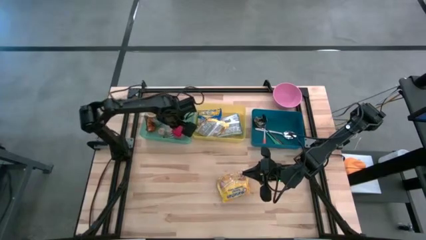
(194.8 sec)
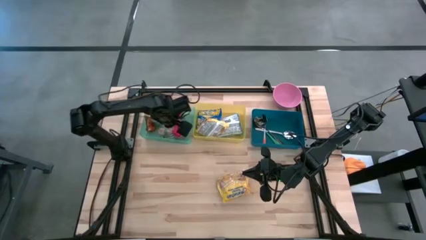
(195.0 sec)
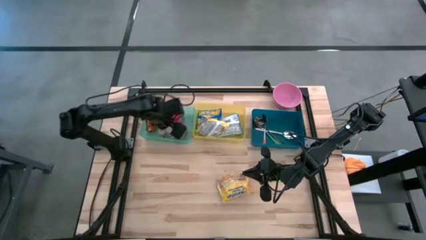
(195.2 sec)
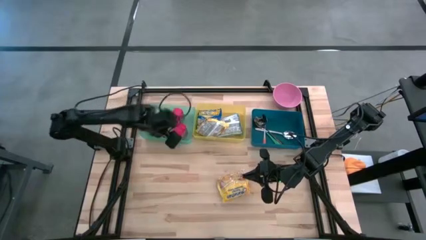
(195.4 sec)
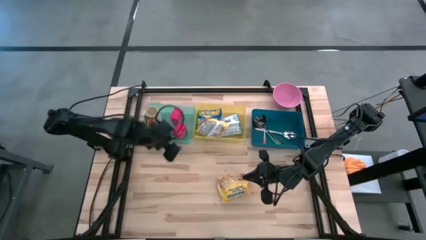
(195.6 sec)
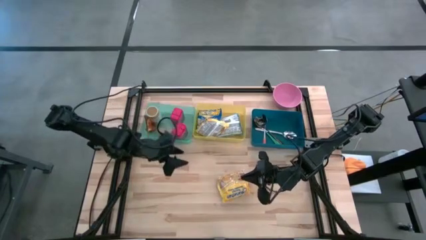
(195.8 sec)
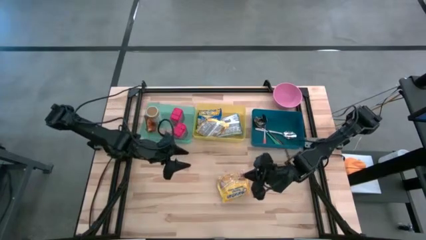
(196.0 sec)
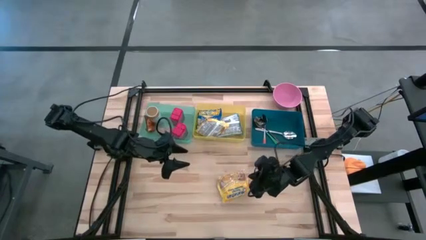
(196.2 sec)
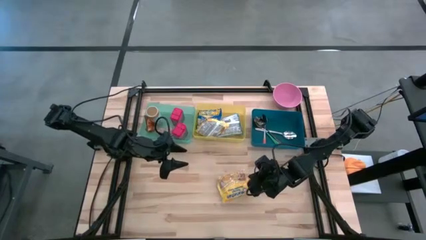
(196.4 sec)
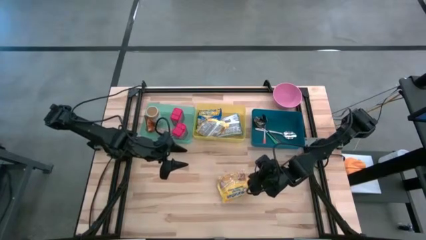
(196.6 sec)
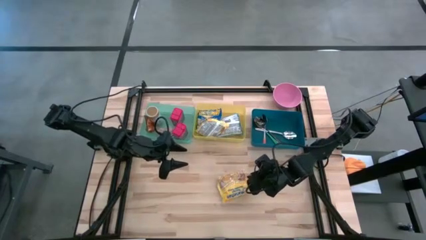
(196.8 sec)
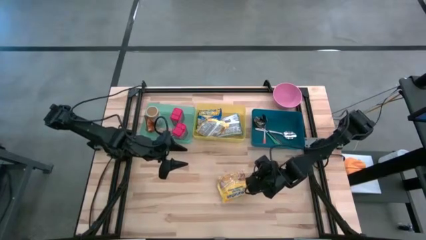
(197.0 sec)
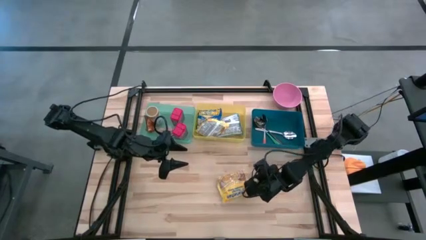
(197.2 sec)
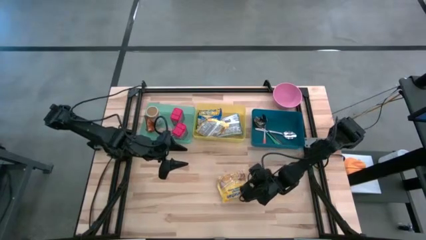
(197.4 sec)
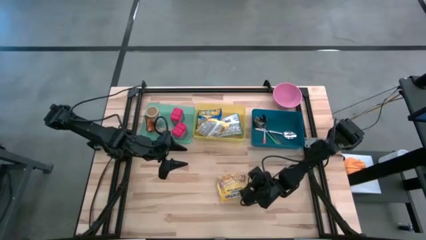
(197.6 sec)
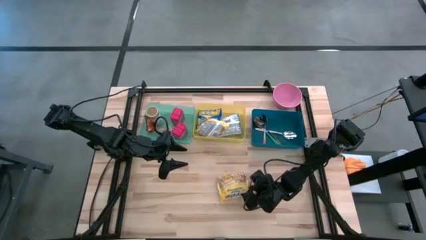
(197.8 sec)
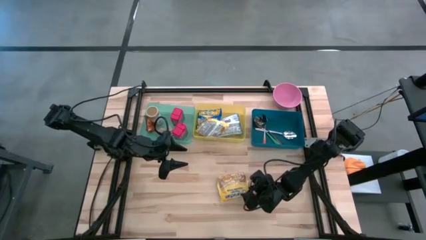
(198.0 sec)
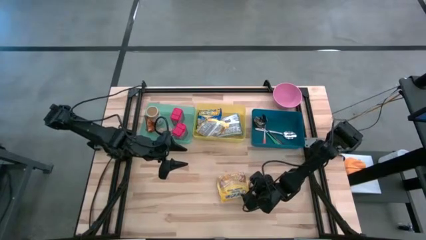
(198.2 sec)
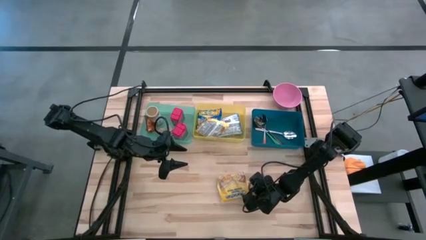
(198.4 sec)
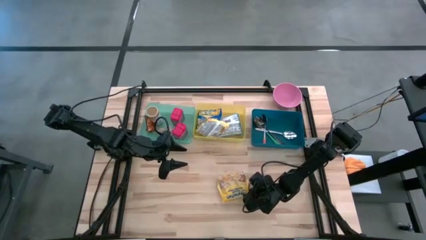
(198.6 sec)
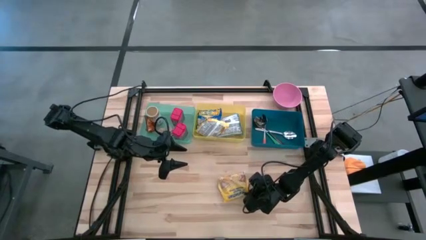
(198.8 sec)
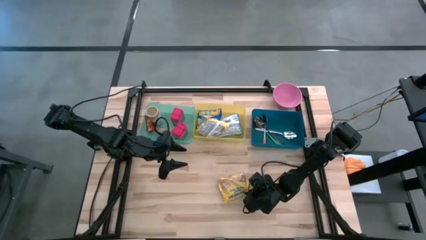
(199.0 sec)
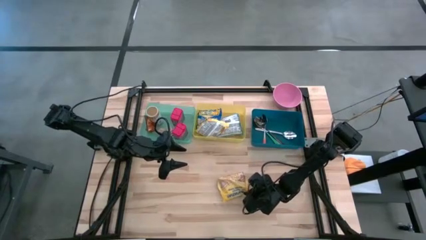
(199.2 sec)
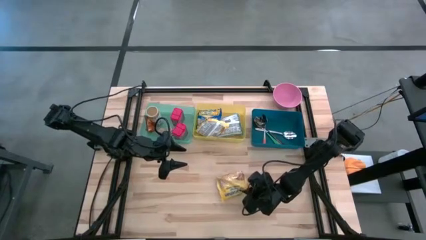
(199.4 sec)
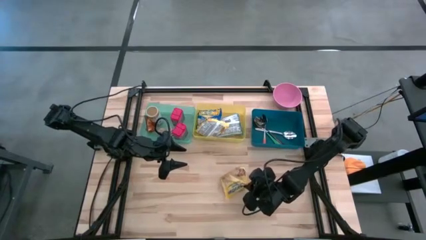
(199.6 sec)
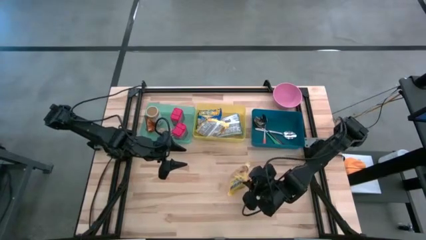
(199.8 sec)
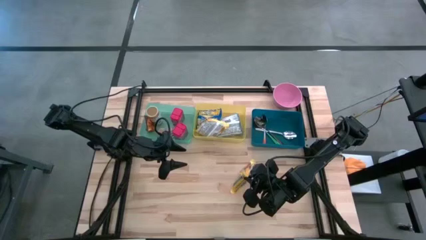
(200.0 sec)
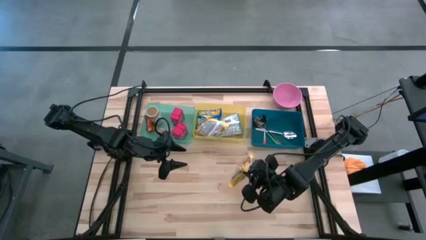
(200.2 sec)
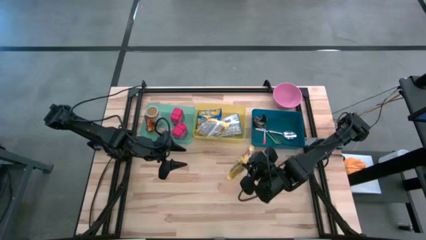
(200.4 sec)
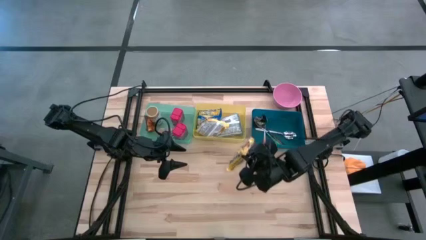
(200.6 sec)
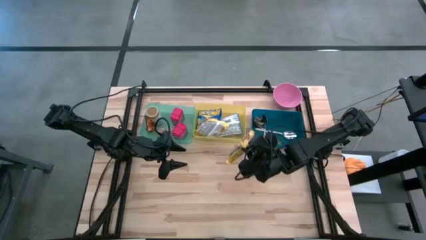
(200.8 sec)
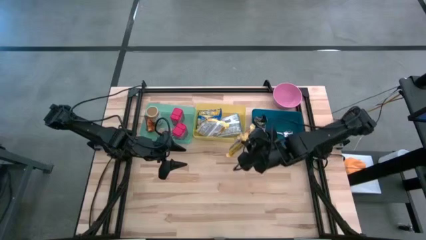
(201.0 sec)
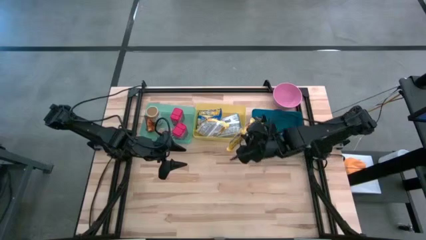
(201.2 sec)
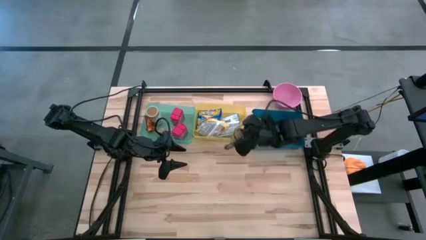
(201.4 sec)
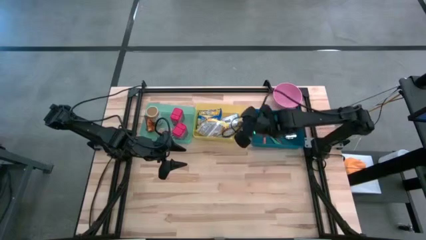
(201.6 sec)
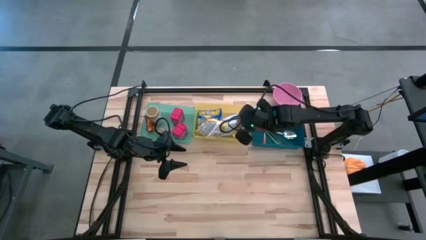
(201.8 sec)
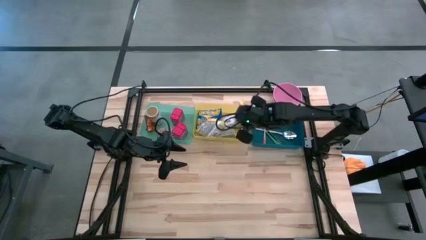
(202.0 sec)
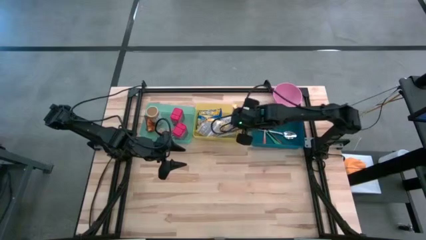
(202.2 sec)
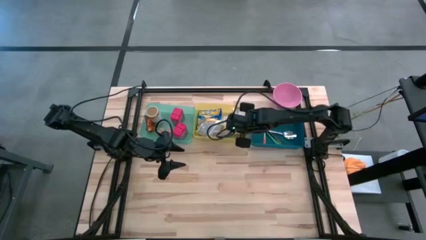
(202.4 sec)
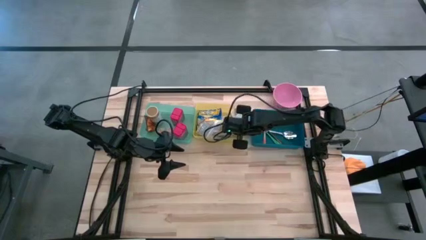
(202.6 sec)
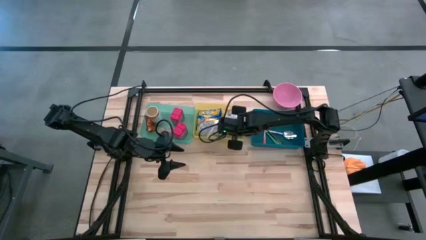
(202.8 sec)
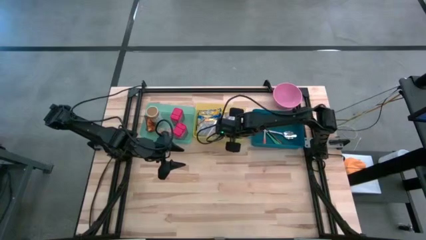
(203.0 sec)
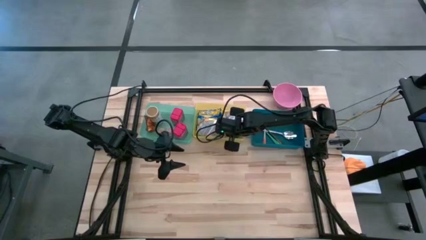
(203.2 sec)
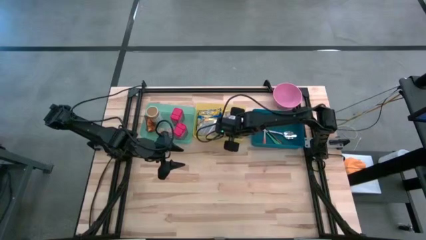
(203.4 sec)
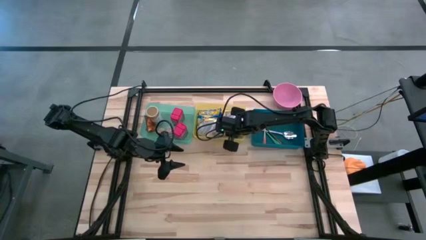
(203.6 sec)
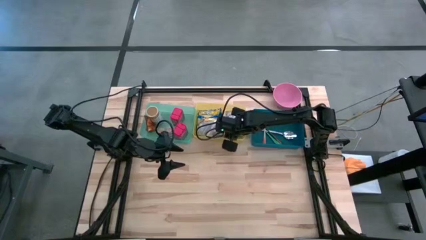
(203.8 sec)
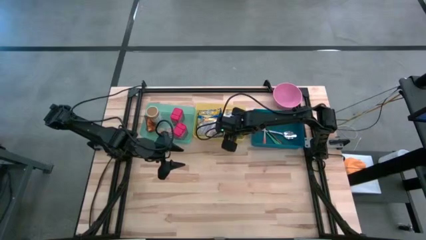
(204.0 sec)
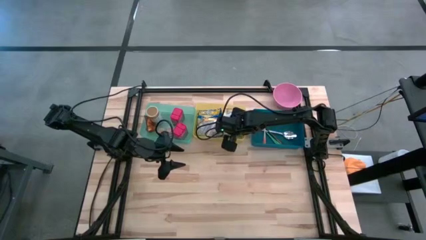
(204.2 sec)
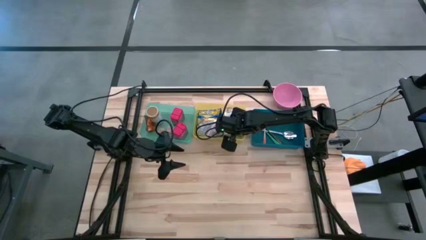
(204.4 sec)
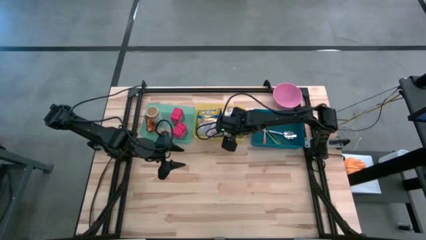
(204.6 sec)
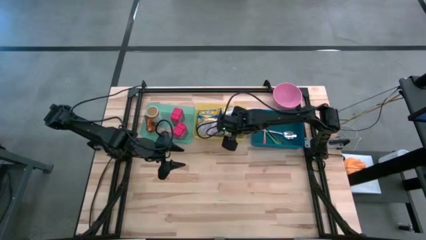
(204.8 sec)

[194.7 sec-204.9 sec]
Put the yellow noodle pack into the yellow bin

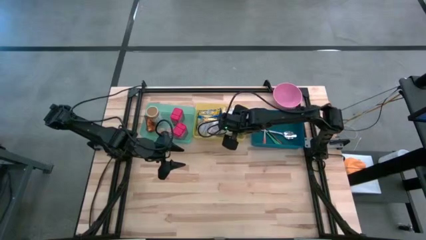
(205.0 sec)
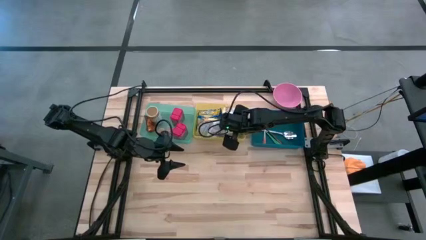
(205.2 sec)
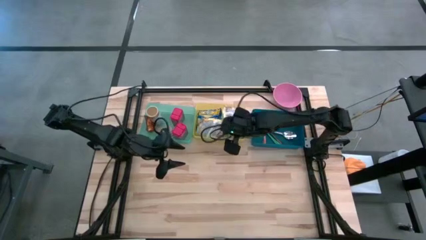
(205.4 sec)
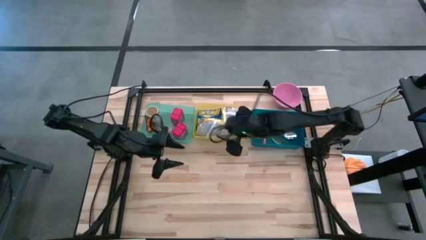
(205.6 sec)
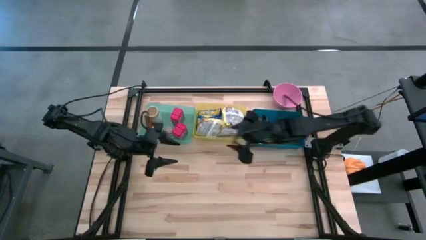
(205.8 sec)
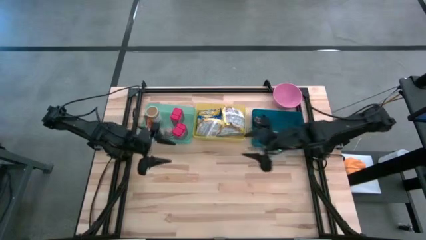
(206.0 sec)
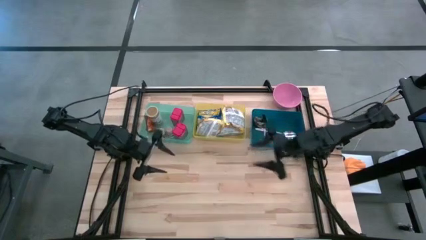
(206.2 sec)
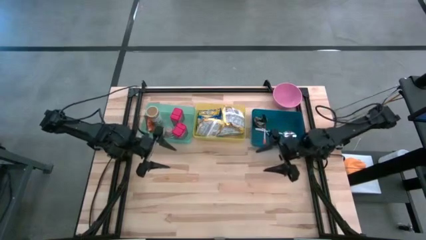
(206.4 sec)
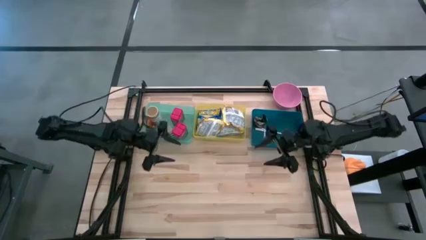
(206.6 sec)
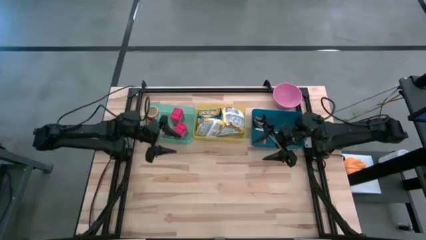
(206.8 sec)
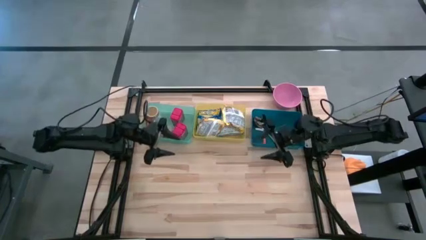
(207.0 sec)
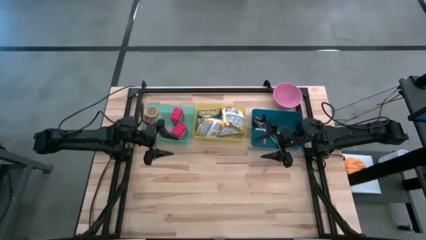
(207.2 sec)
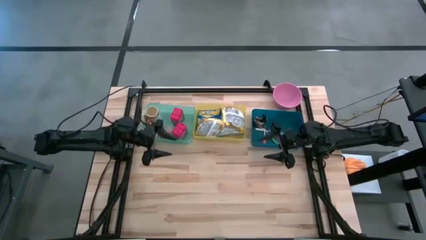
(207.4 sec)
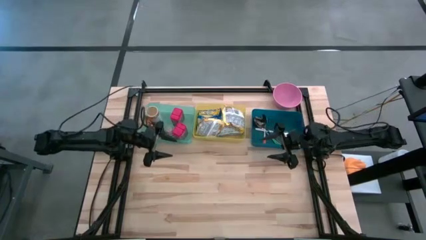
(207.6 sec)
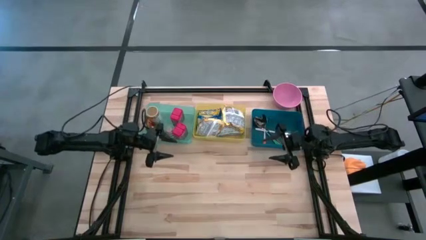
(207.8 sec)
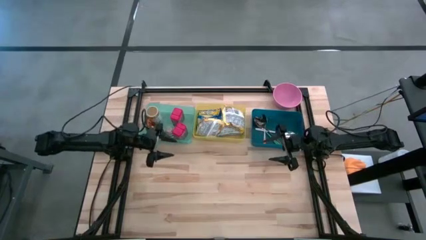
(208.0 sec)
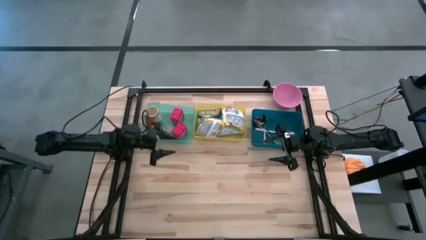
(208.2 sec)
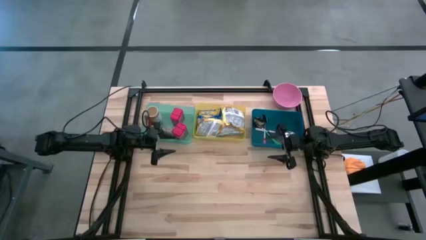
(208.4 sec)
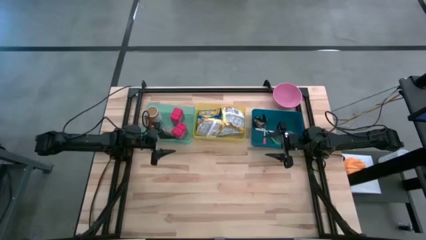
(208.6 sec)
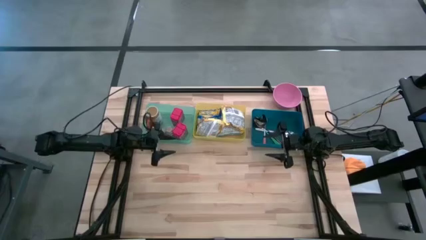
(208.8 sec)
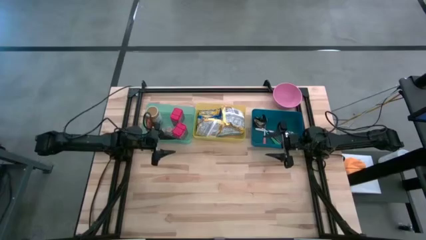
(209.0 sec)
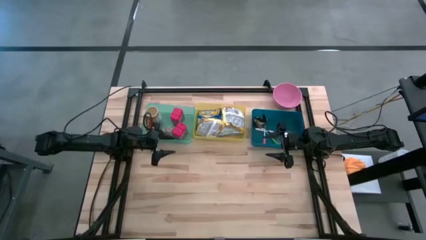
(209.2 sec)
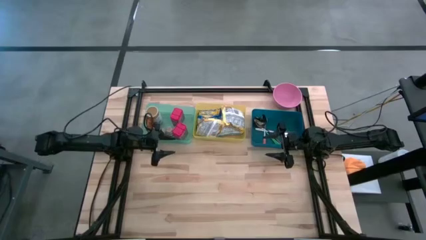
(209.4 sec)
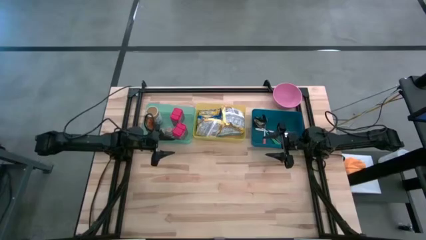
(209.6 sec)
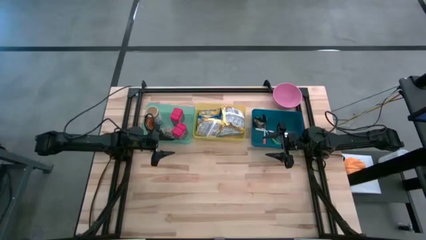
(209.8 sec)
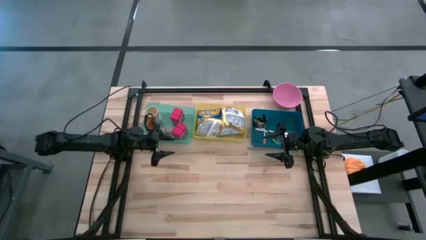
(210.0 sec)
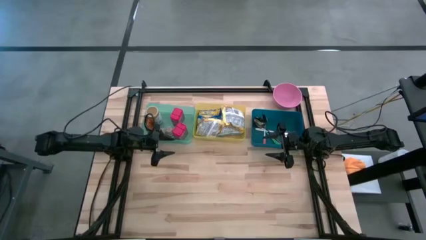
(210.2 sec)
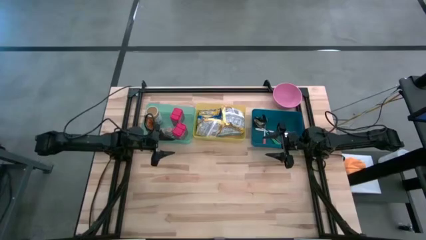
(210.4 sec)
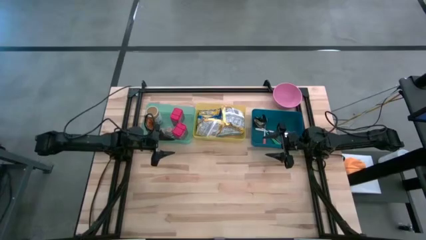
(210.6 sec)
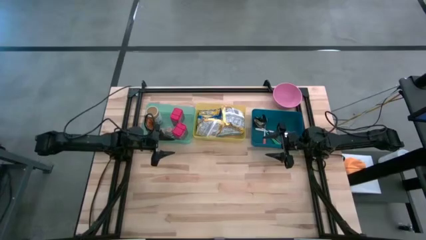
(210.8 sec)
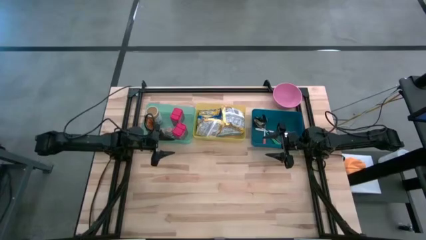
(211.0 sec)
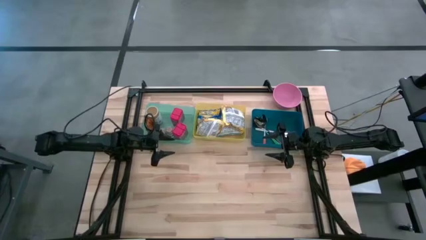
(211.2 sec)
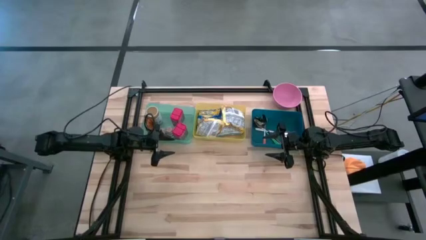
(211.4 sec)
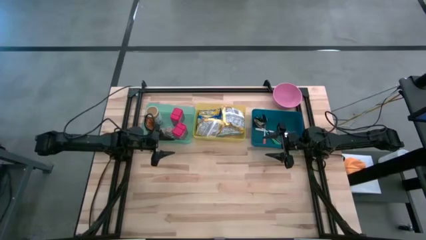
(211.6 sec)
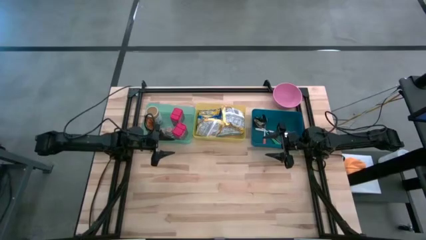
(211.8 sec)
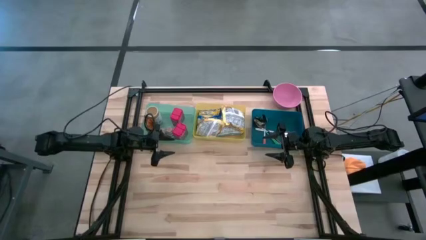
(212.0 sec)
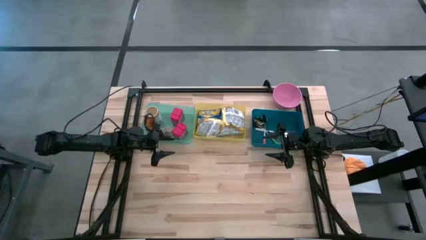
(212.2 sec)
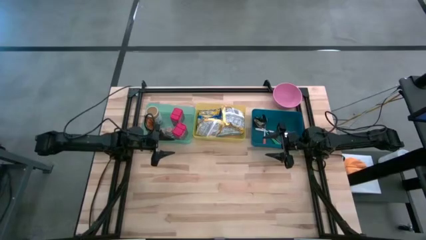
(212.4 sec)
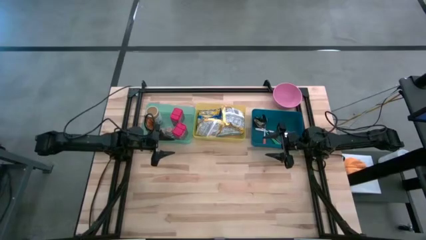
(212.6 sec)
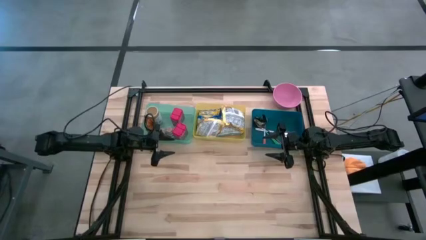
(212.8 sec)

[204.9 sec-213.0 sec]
Return to Home Position
